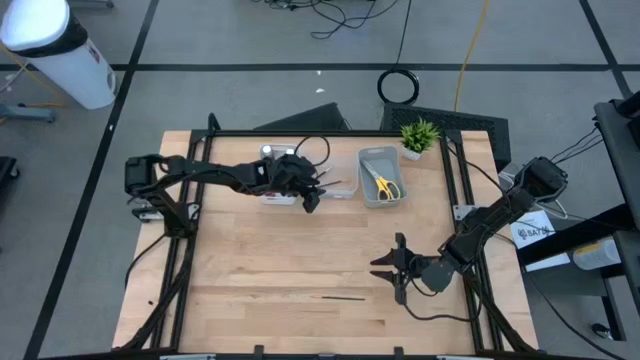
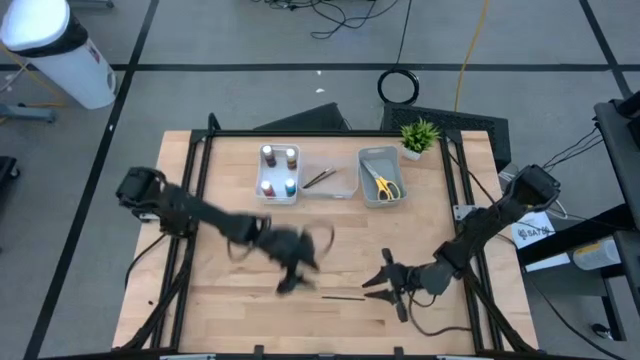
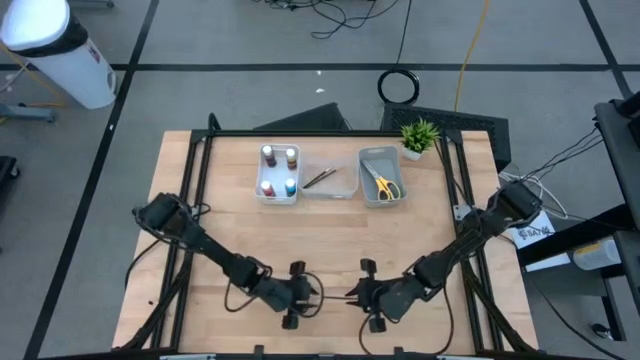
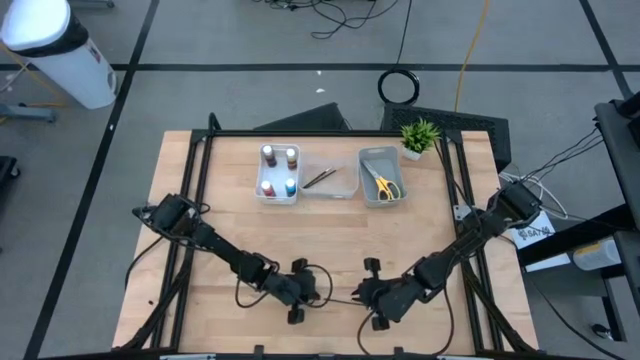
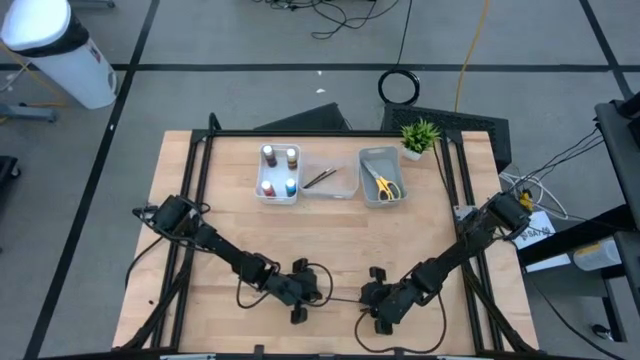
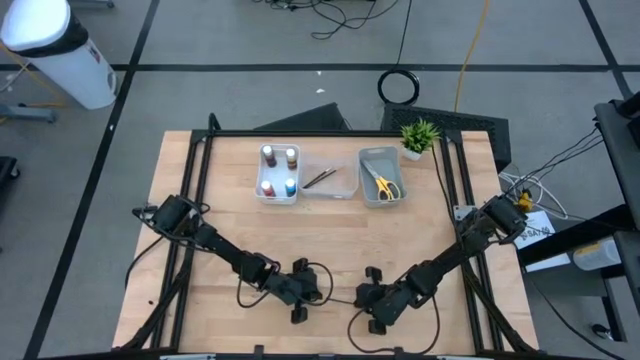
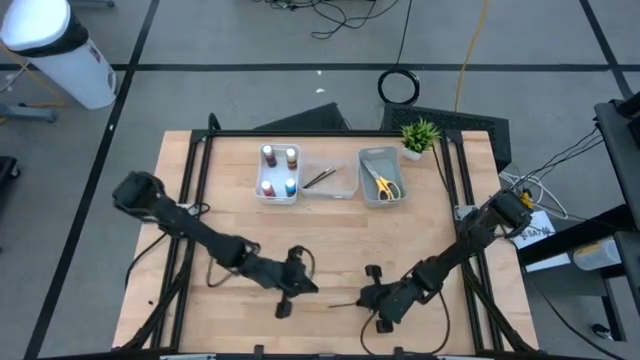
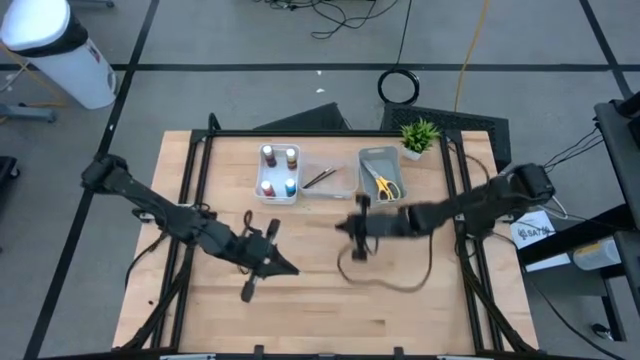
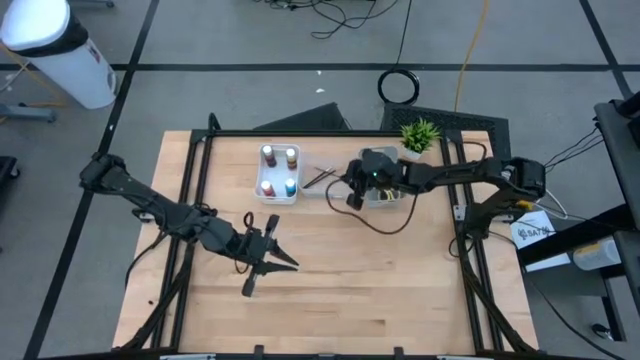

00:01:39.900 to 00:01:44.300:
Task: Pick & Place Paint Supplies
Put the gold paint brush in the transparent bin

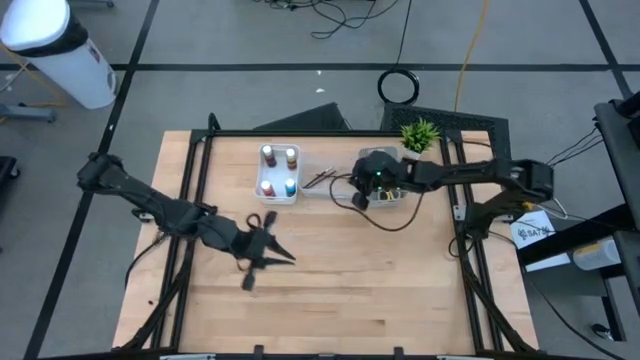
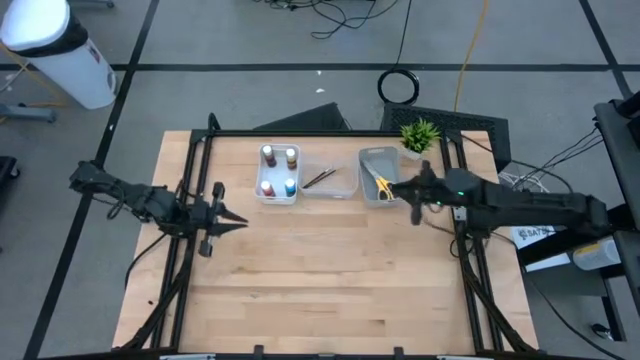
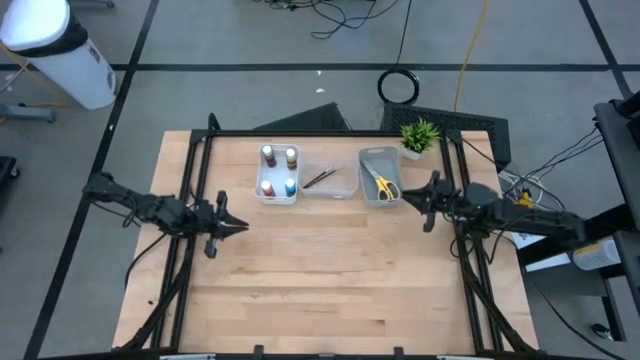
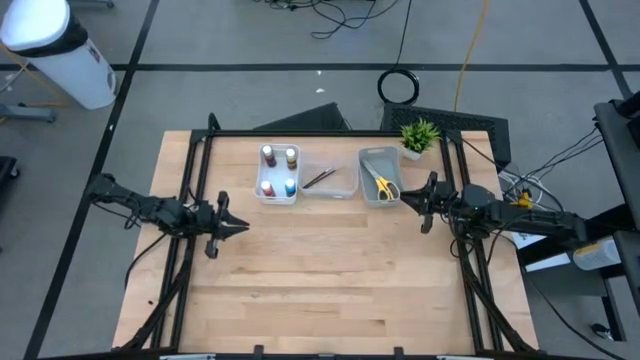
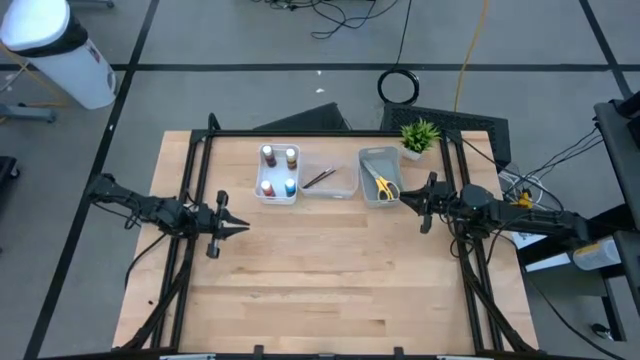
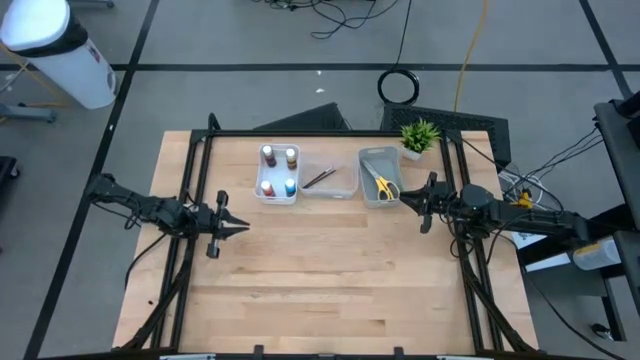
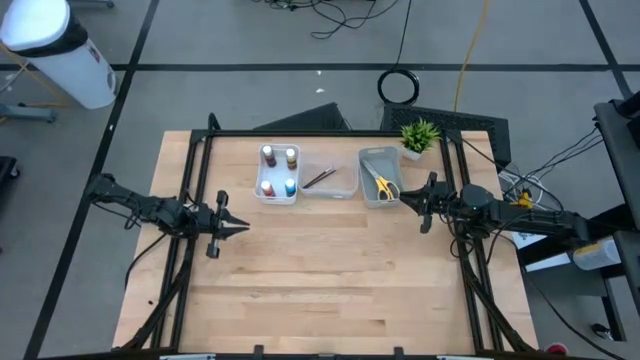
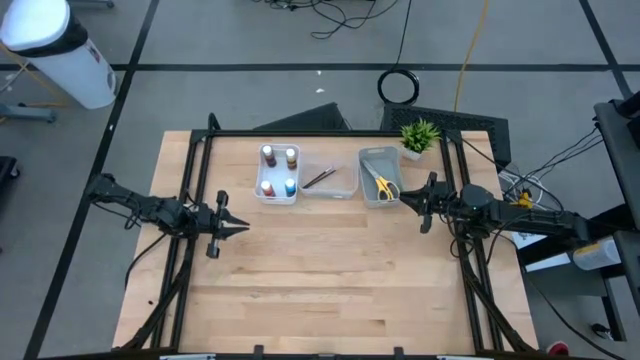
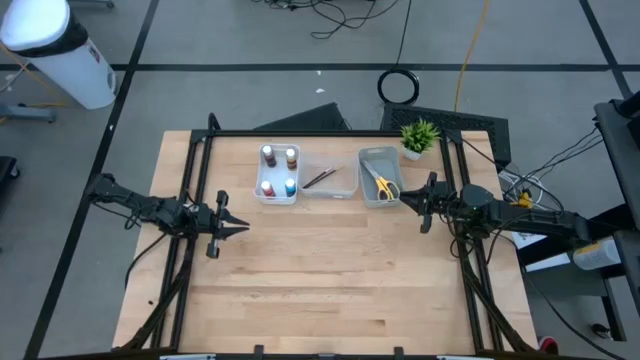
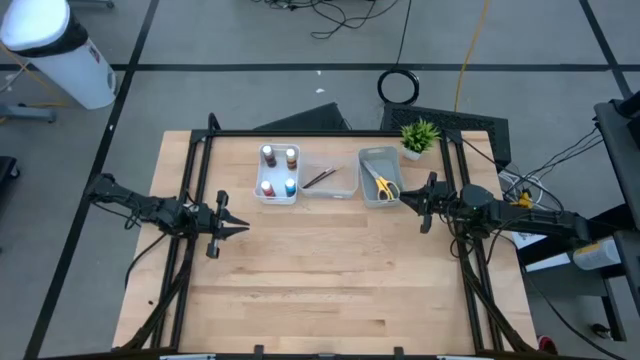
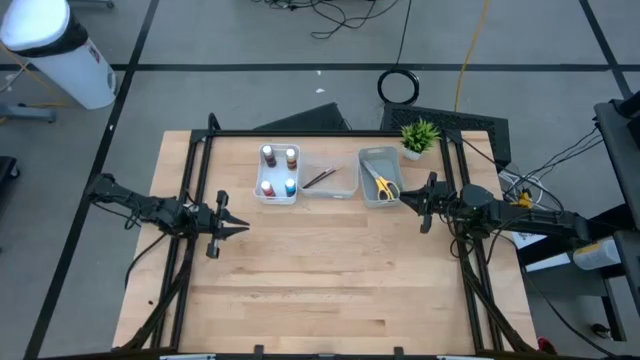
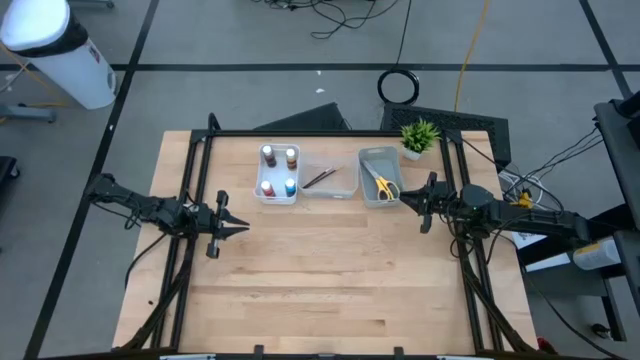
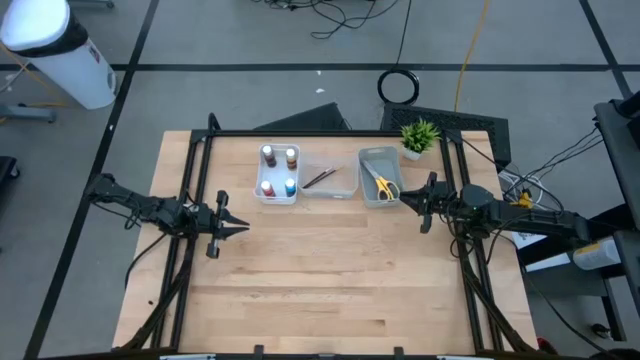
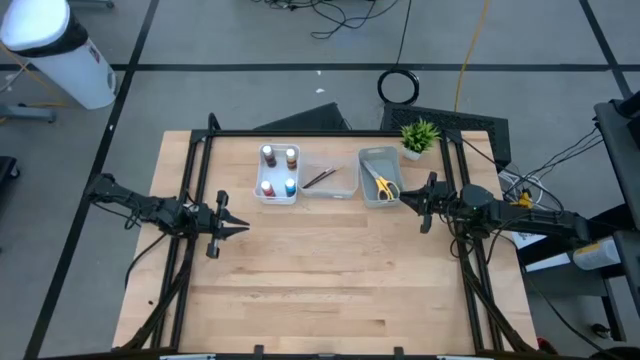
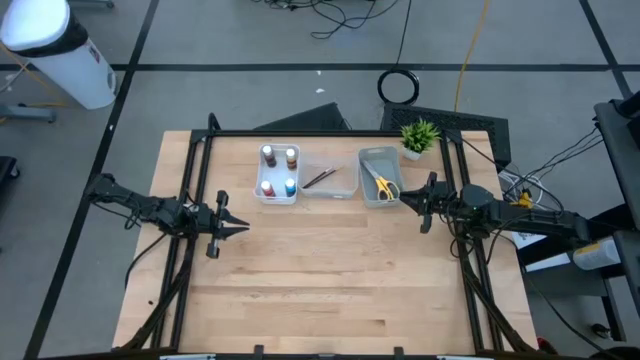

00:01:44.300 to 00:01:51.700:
Return to Home Position

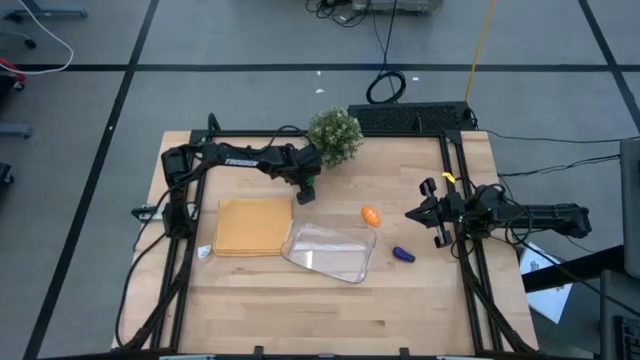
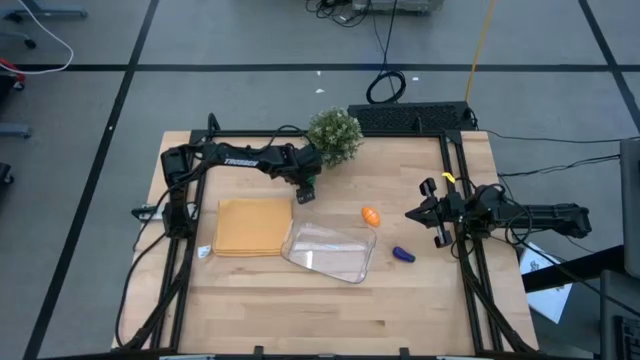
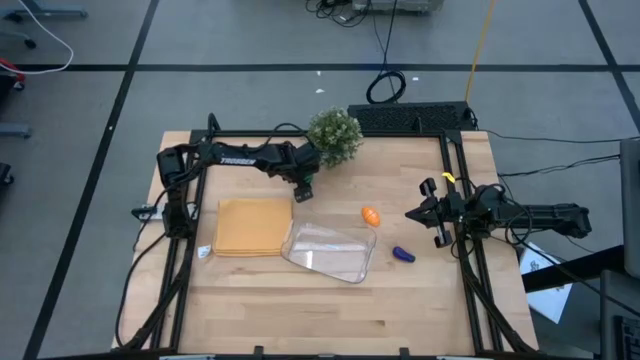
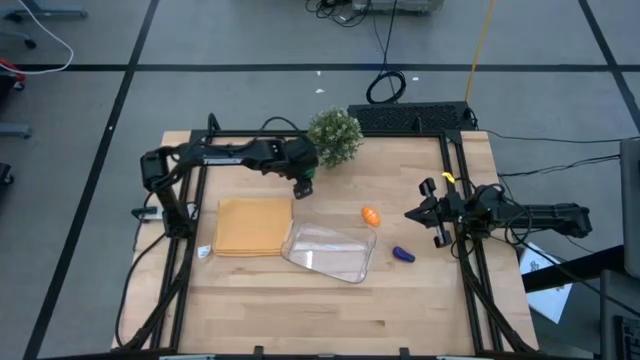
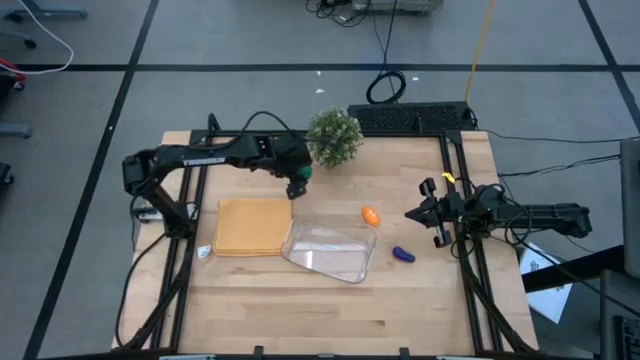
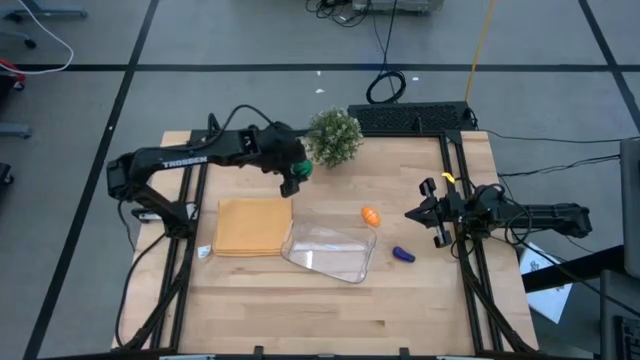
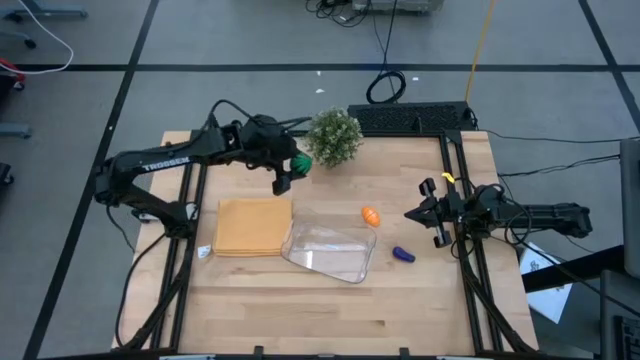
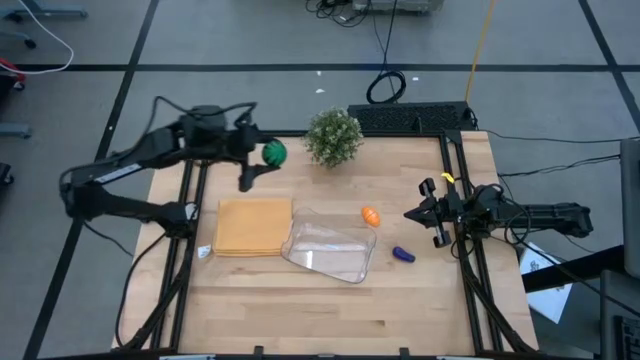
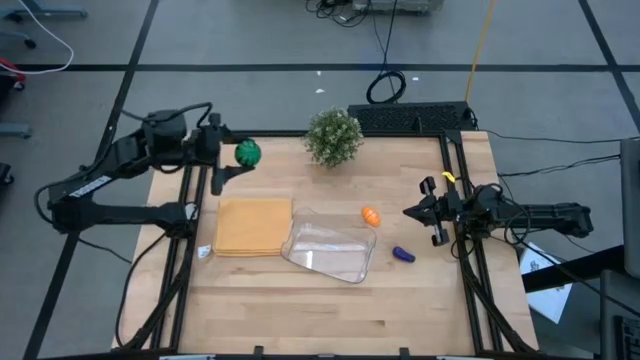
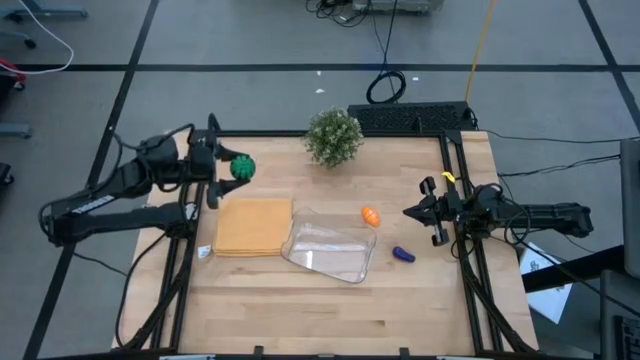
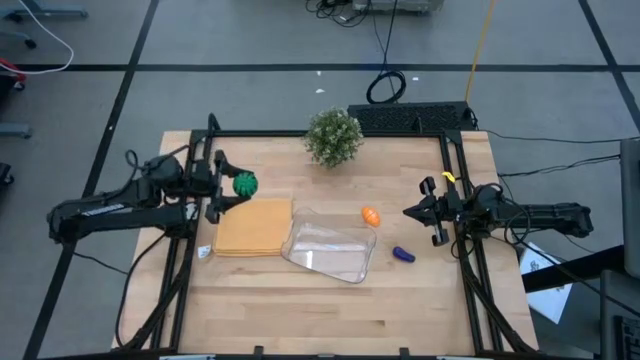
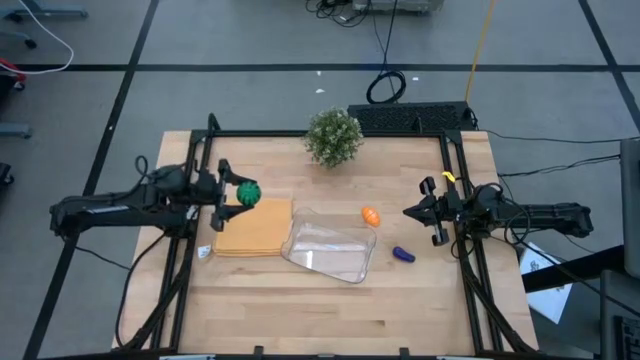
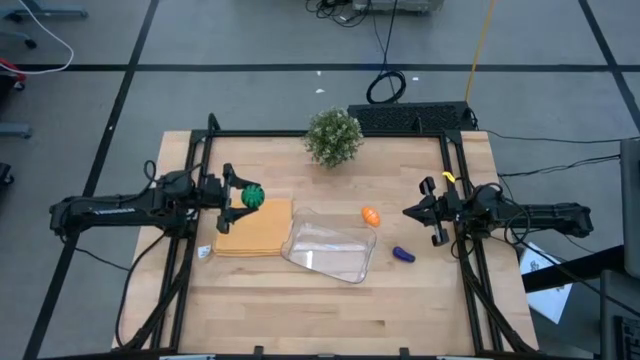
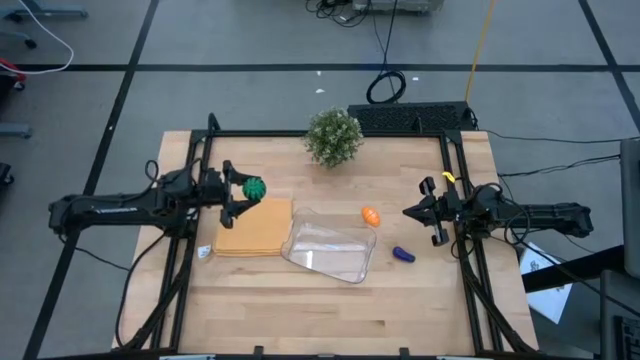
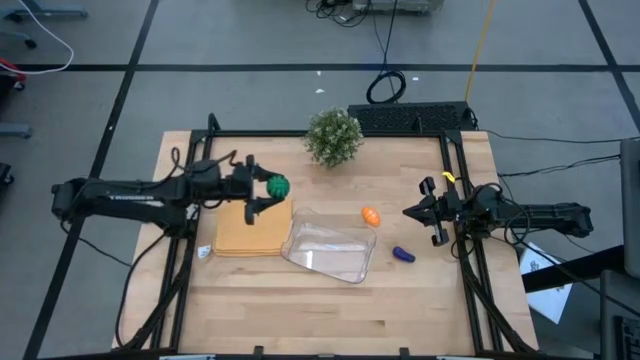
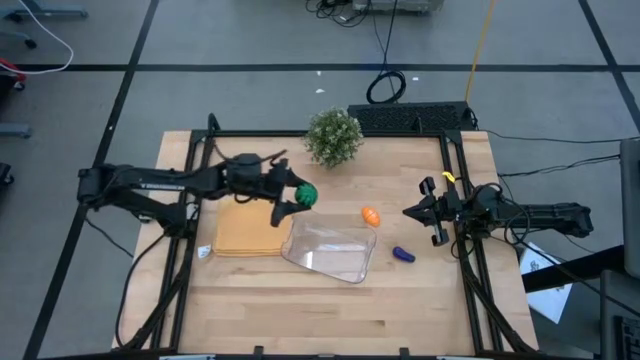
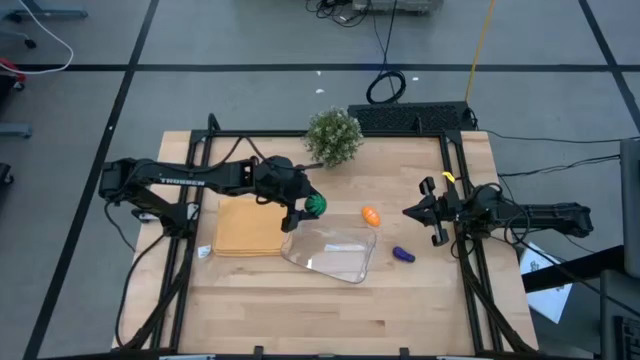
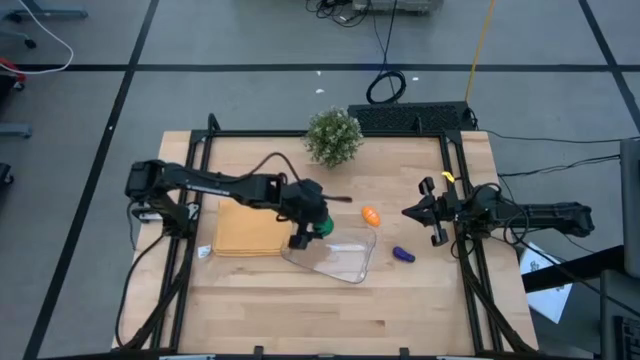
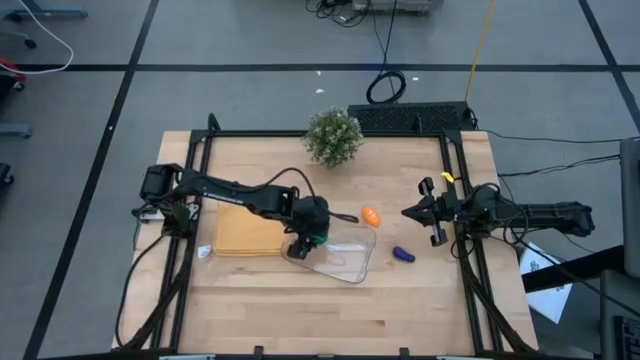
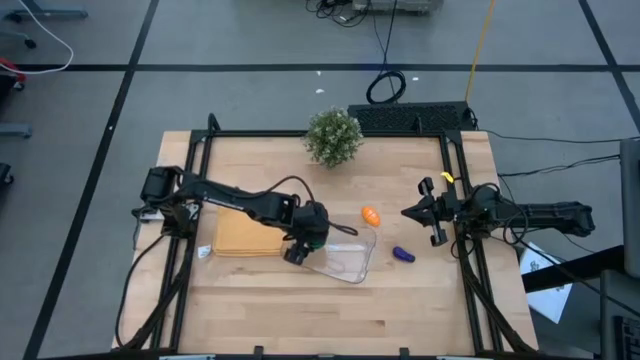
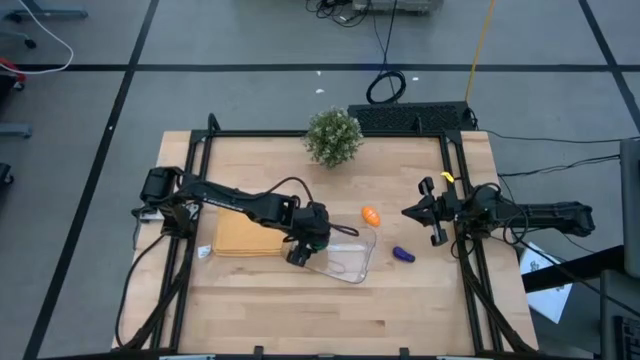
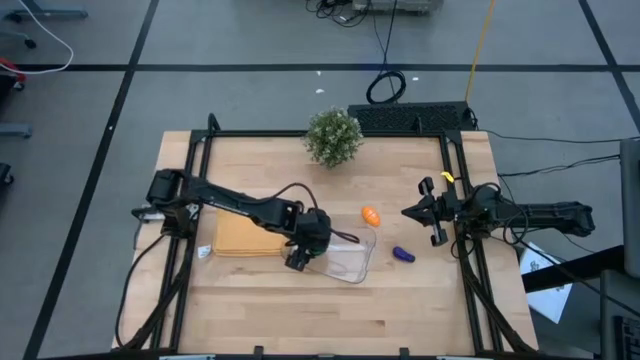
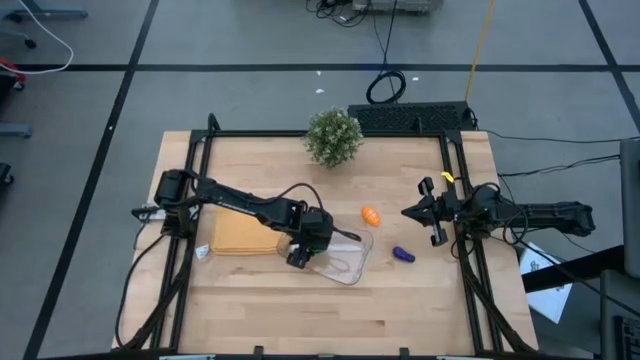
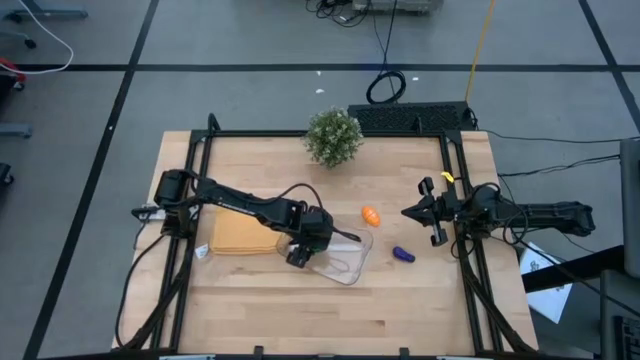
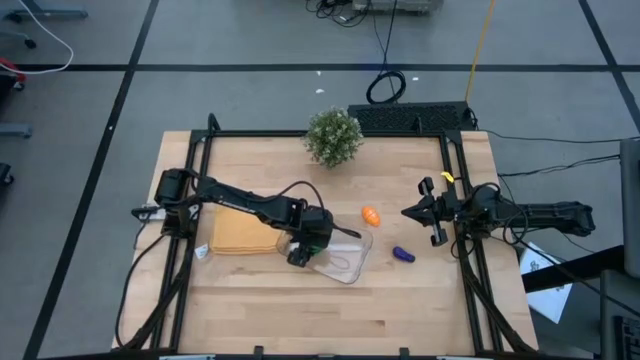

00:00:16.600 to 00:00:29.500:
Task: Pick and placing Produce into tupperware
Put the watermelon into the transparent bin
